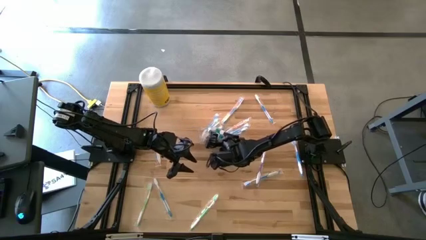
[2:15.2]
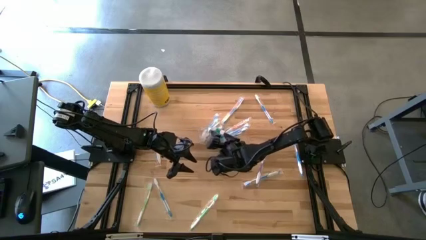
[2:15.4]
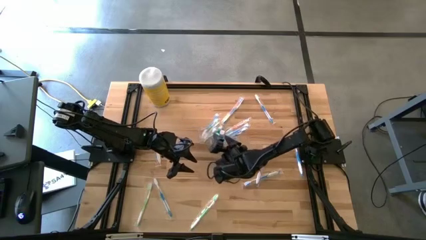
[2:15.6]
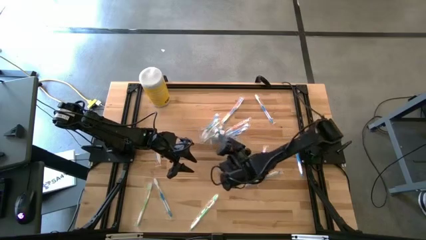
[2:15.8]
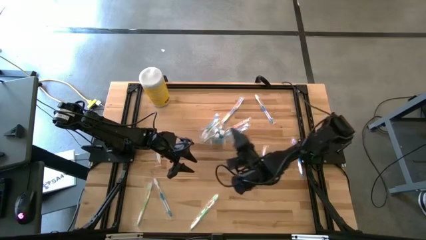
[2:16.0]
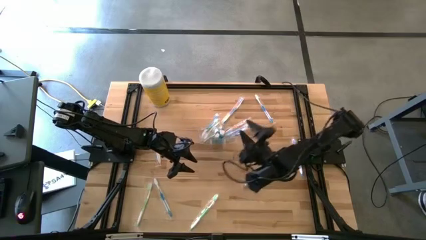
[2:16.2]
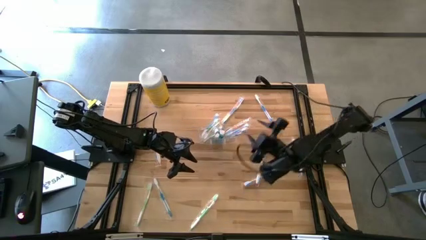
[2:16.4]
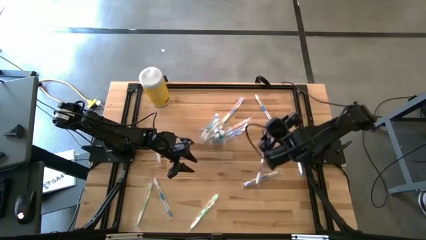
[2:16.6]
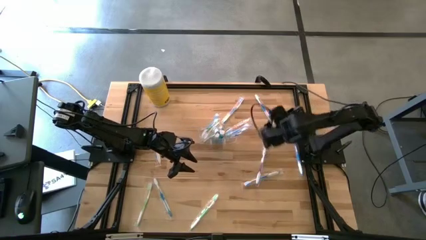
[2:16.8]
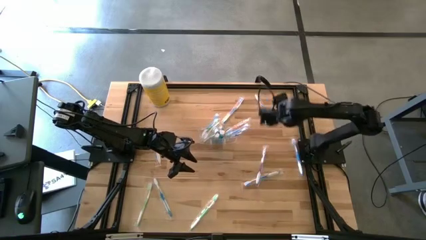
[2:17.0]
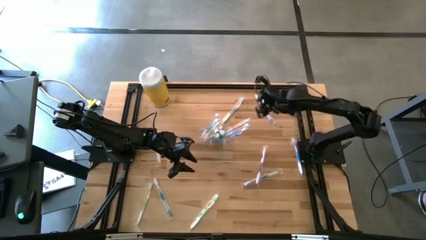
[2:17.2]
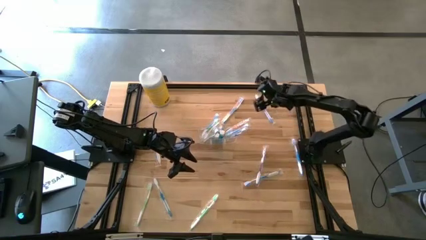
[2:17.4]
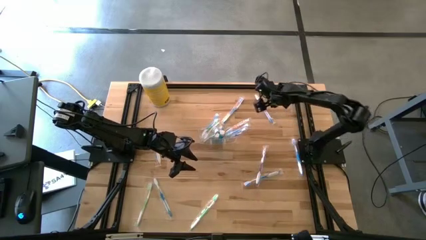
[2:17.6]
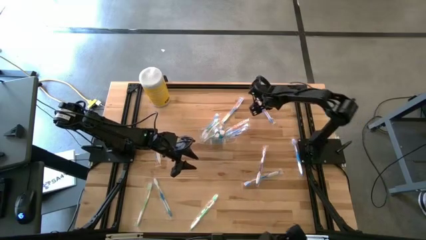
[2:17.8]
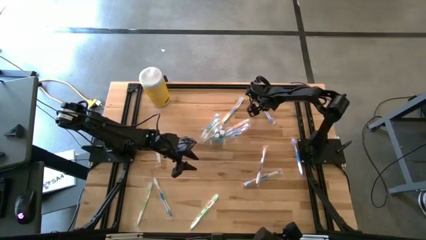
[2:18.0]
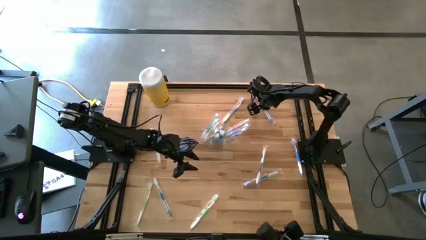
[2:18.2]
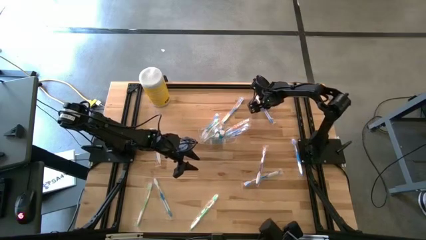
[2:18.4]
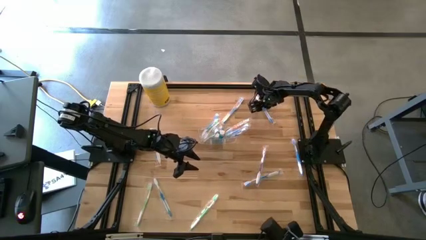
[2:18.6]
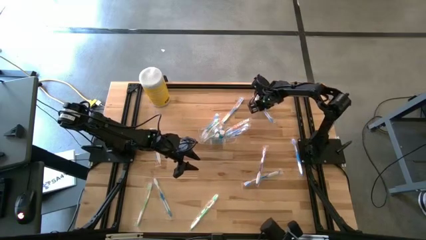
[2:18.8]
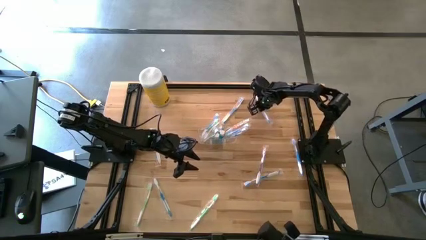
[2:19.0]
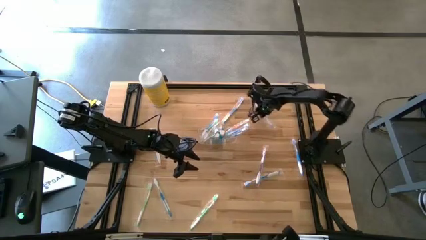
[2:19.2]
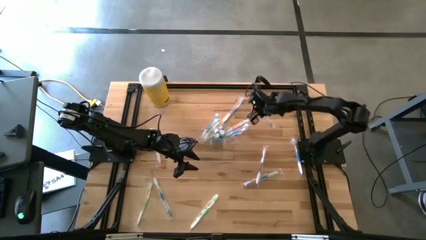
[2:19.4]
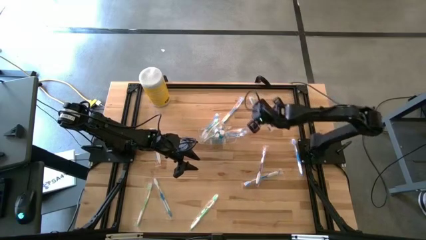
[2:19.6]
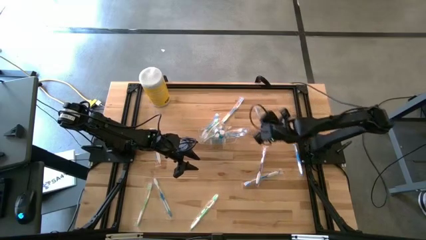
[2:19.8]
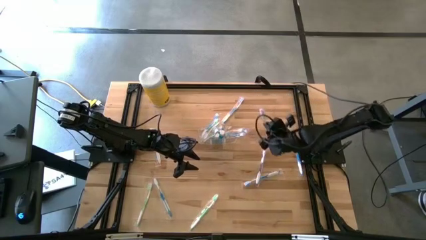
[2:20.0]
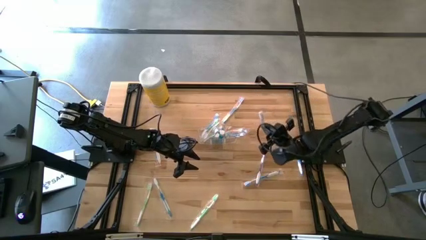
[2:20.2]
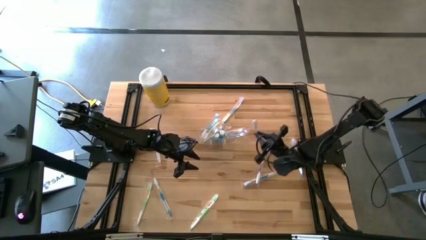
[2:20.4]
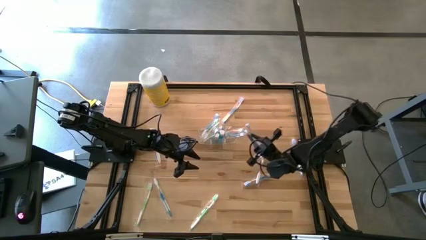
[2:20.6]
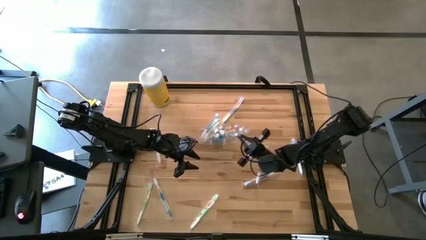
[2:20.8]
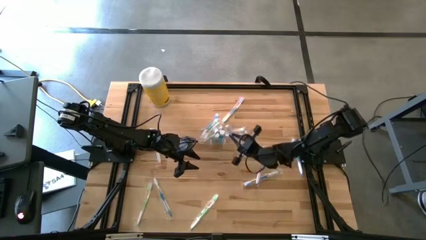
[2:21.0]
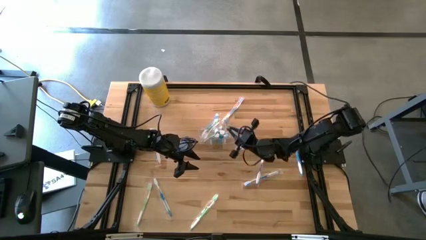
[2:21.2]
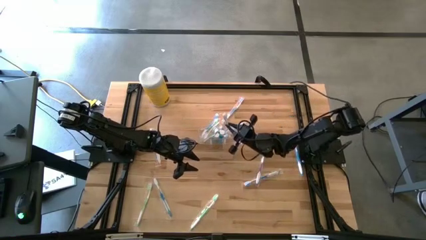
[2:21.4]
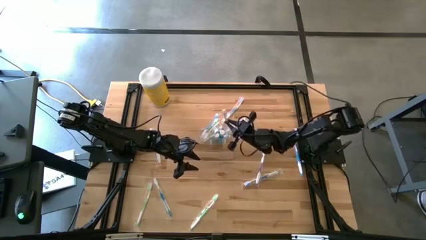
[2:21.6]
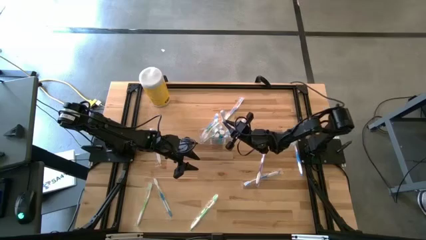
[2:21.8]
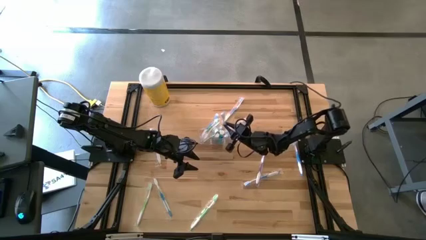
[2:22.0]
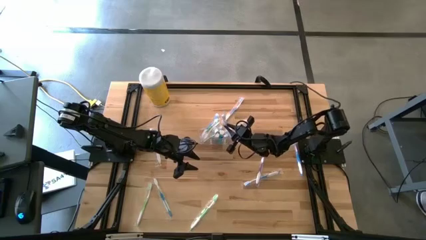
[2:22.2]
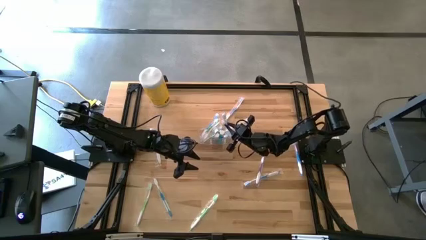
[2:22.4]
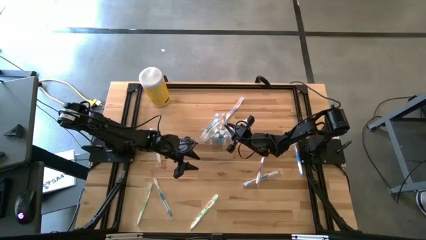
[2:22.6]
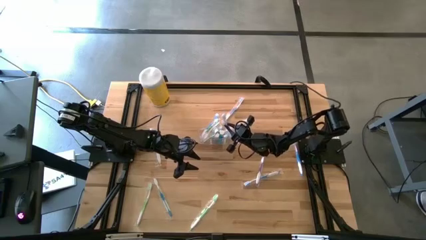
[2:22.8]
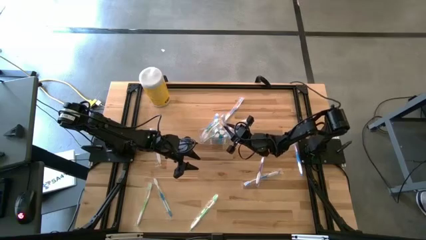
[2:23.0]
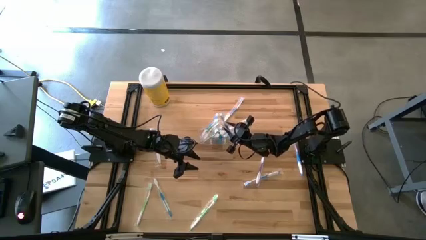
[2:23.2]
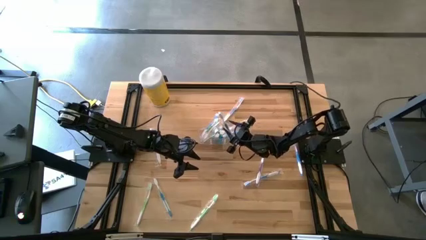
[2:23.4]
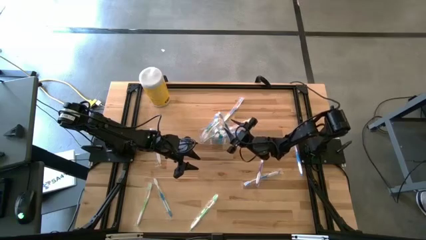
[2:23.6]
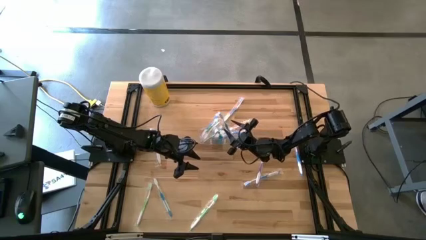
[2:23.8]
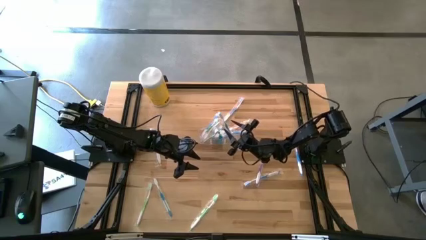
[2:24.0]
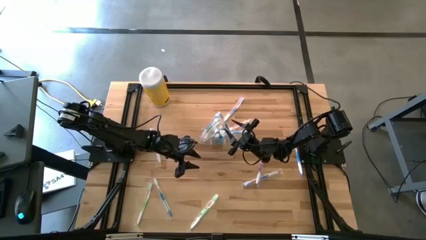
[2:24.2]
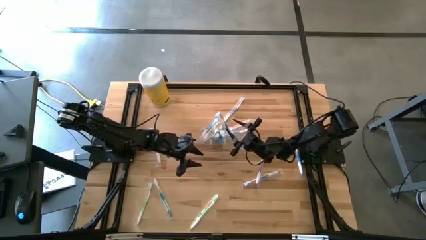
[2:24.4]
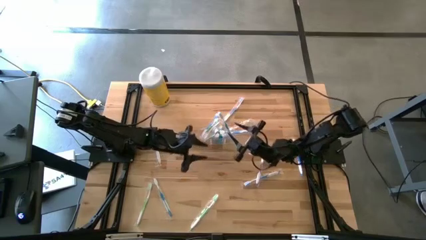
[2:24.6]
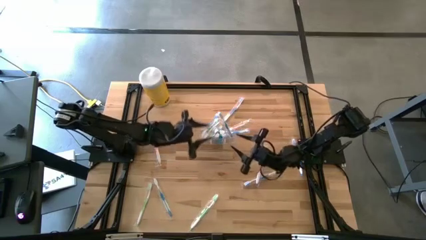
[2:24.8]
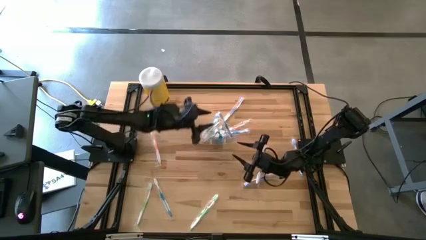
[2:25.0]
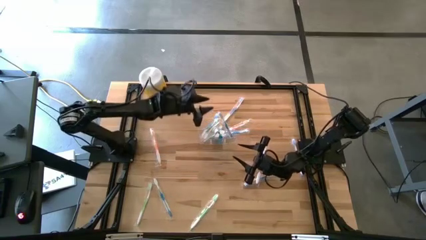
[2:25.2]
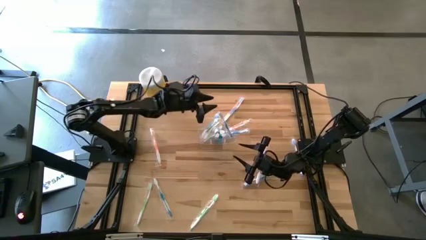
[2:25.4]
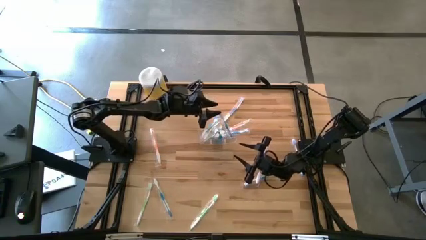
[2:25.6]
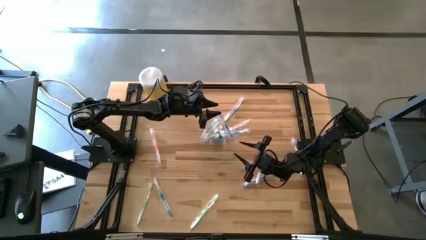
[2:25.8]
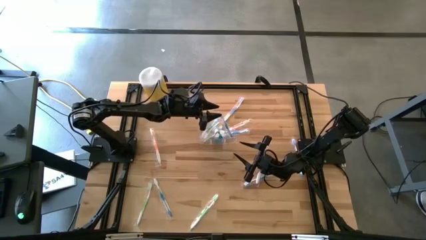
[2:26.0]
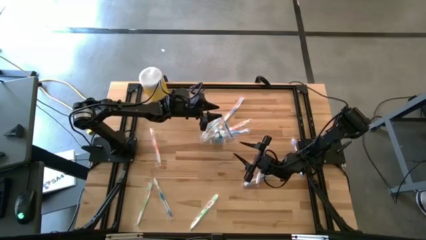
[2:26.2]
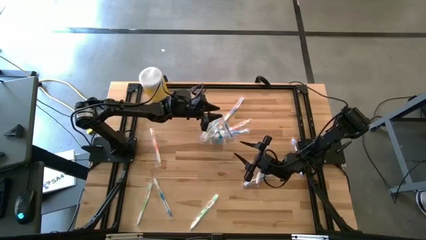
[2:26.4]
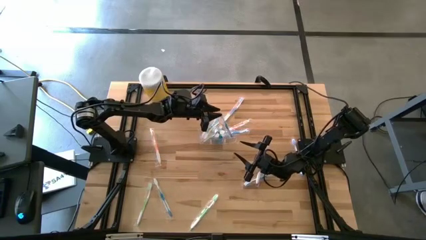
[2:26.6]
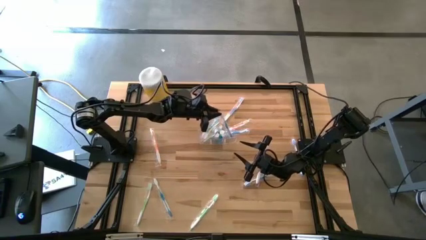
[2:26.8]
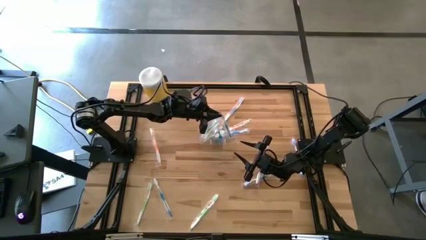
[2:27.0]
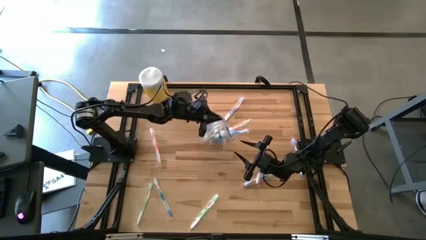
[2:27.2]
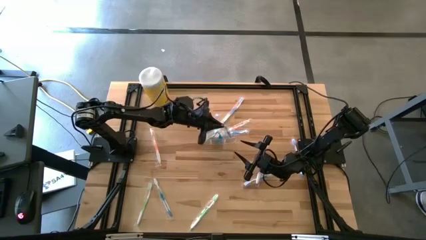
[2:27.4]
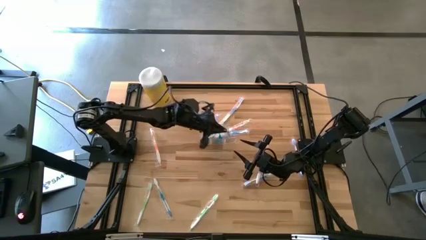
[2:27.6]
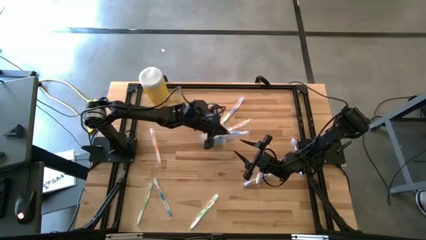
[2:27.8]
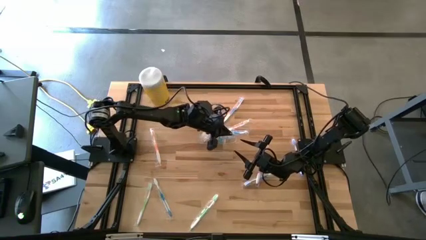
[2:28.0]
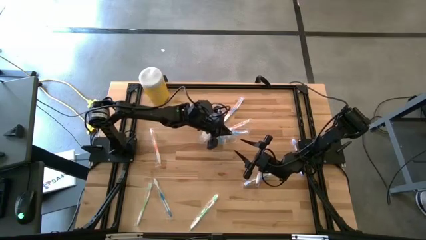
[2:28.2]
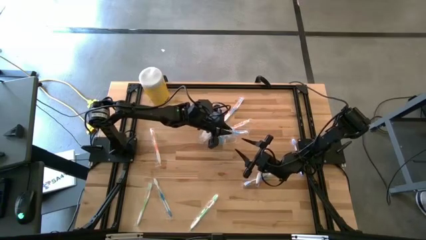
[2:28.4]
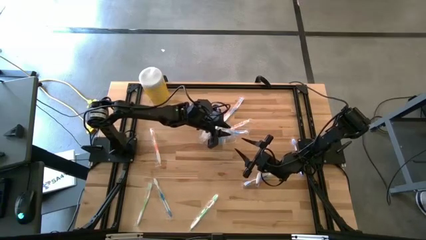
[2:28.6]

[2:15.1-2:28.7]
Task: Pick & Place toothbrushing station
Put the blue toothbrush into the transparent organizer

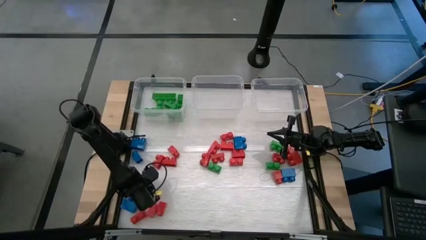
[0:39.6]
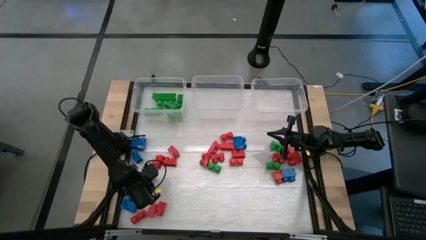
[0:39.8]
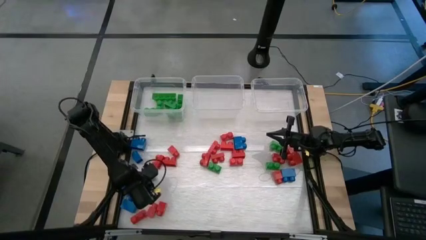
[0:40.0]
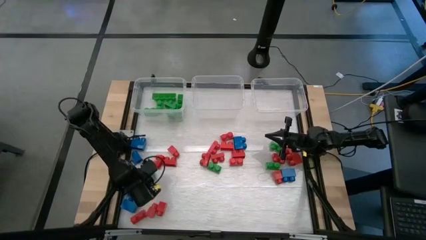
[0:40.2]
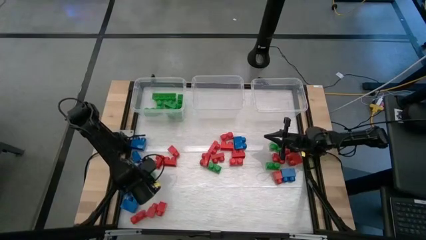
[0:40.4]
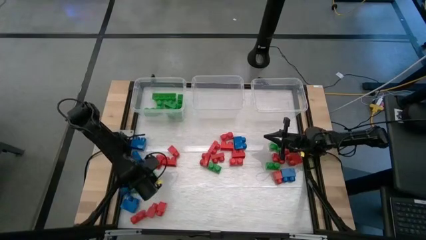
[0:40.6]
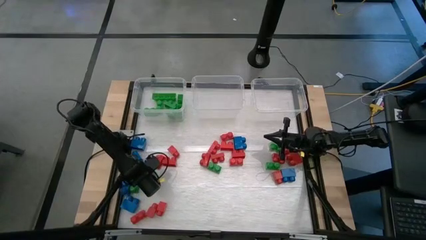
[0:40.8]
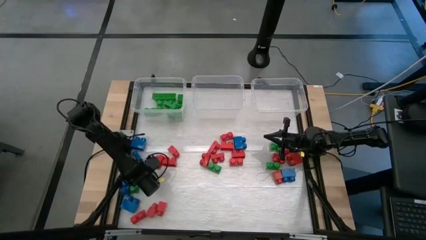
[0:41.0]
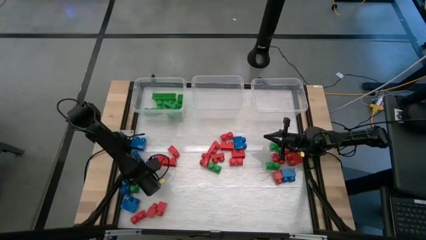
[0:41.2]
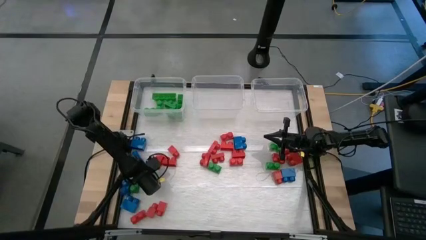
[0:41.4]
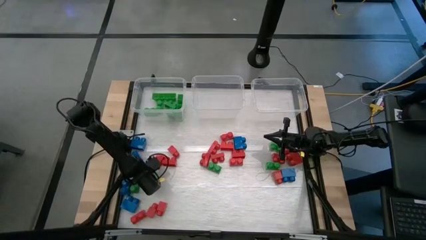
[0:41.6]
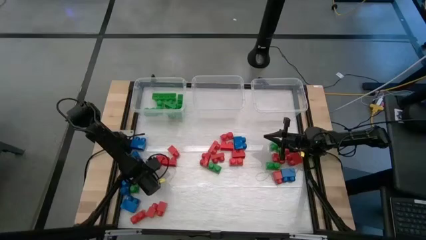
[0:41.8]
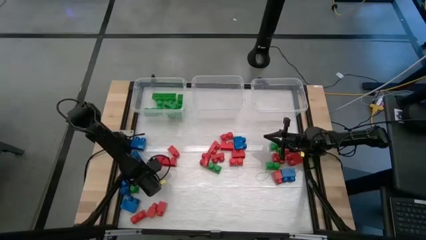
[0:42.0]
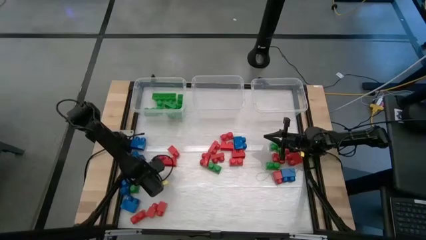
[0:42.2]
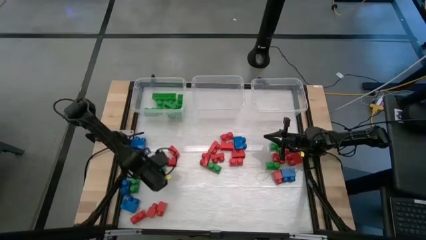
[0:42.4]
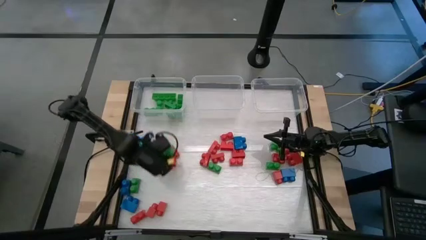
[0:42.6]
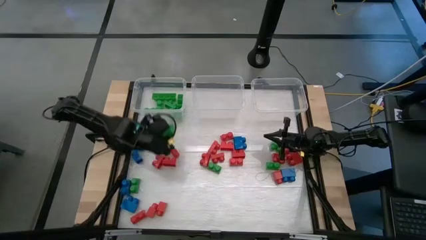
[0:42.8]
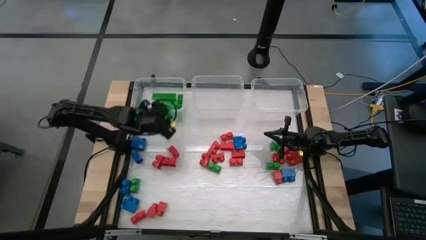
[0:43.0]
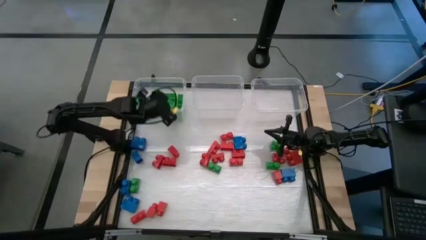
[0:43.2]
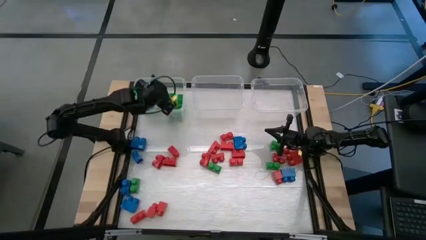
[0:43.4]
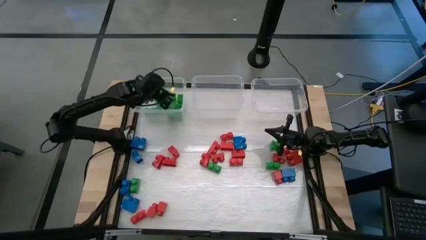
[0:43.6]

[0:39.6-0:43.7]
Task: Sort blocks
Put the green game piece into the left transparent bin
